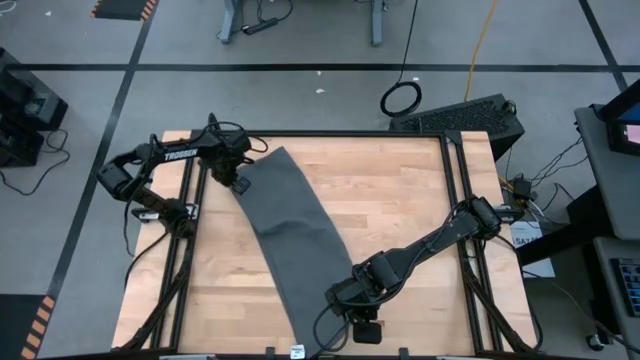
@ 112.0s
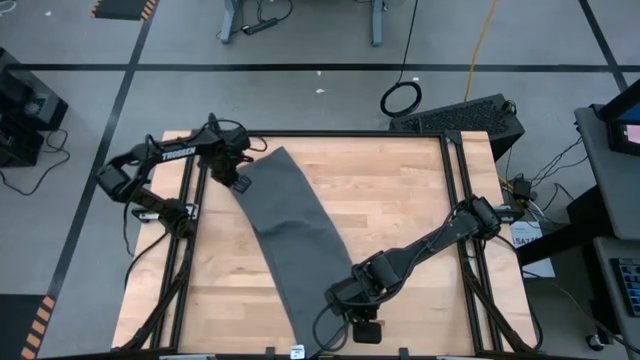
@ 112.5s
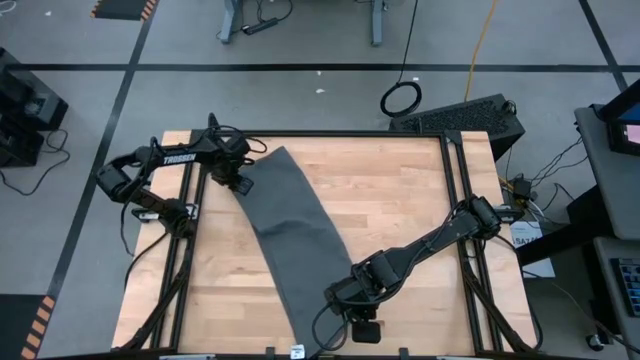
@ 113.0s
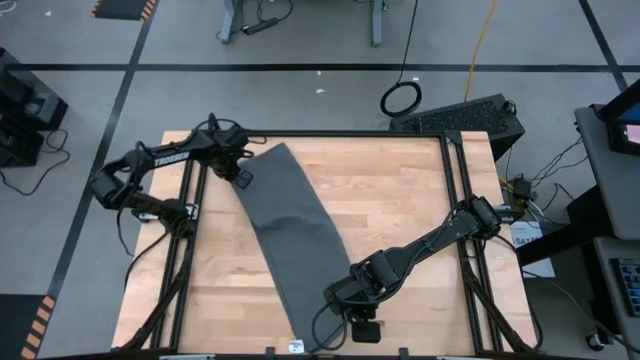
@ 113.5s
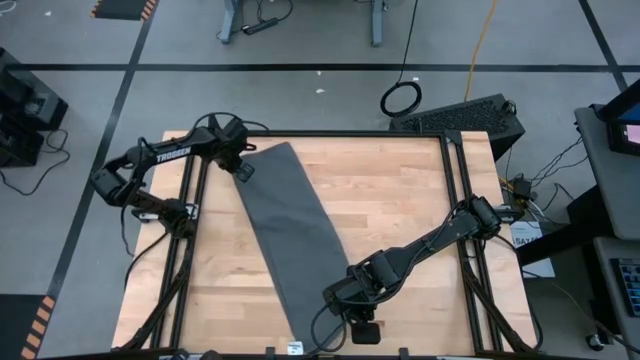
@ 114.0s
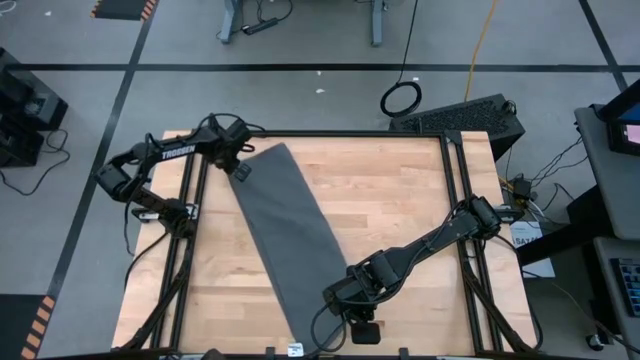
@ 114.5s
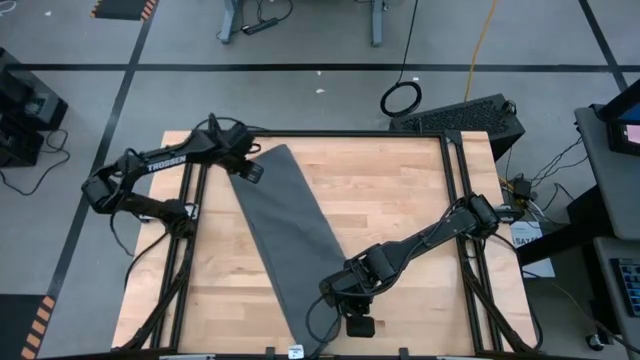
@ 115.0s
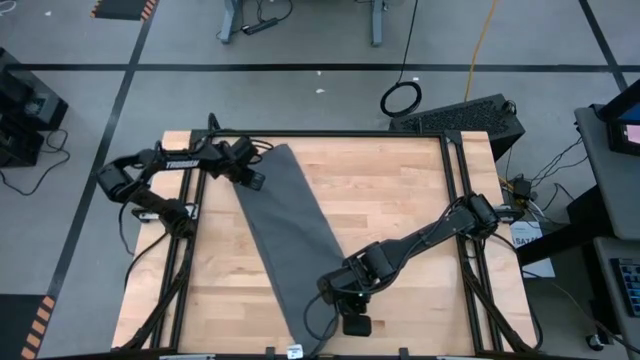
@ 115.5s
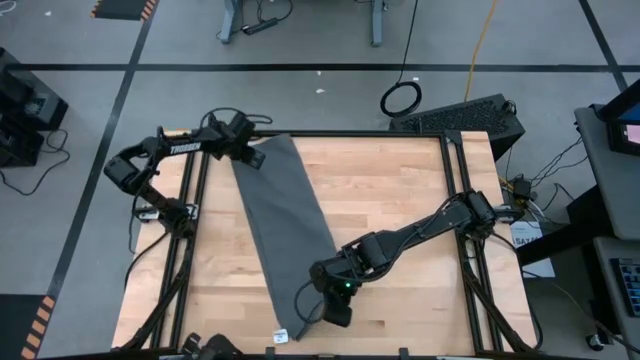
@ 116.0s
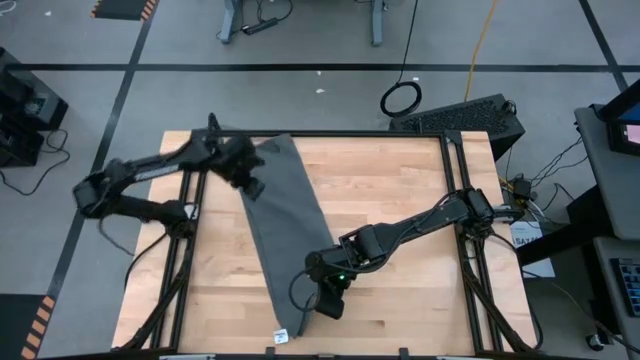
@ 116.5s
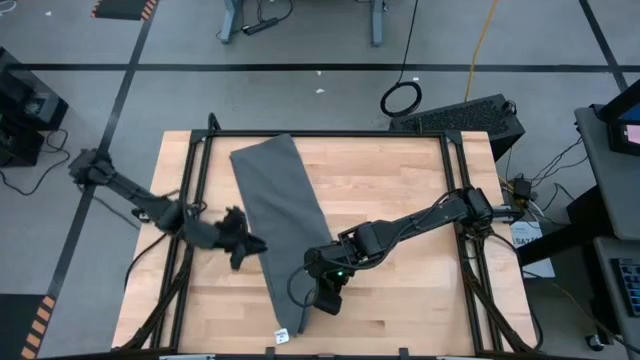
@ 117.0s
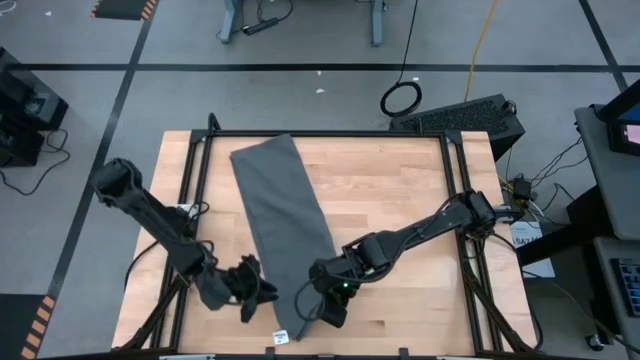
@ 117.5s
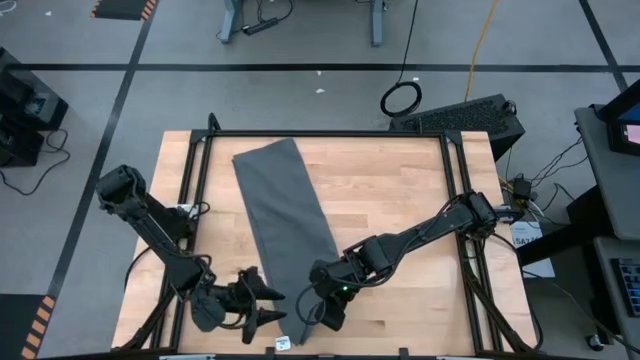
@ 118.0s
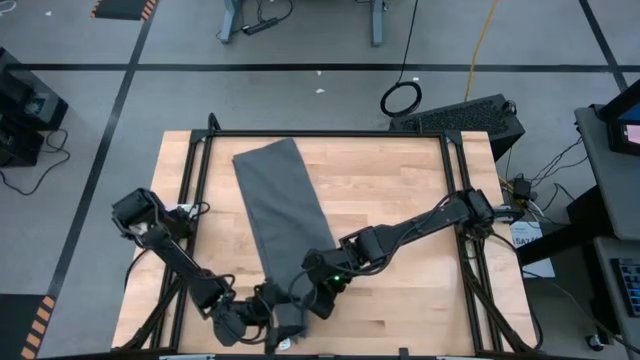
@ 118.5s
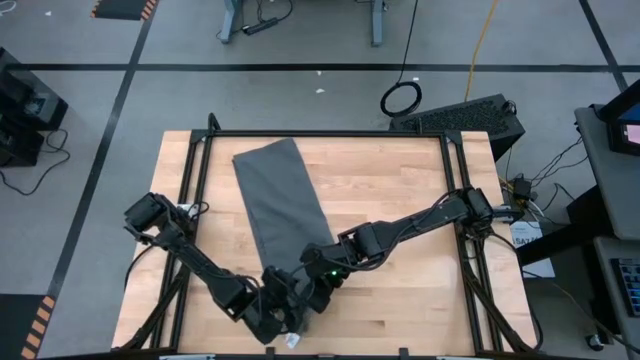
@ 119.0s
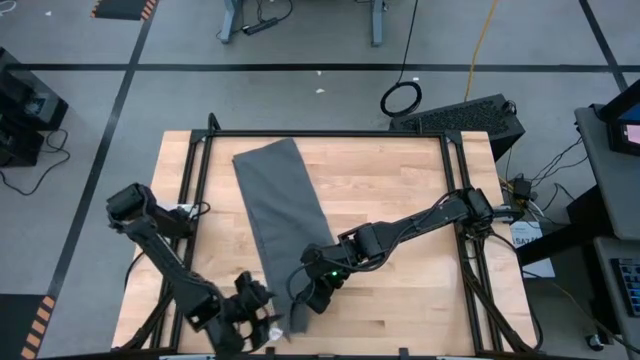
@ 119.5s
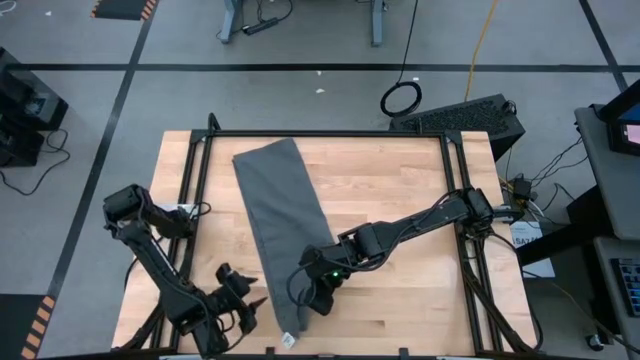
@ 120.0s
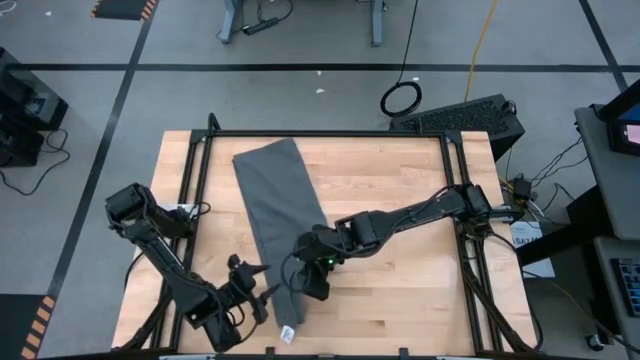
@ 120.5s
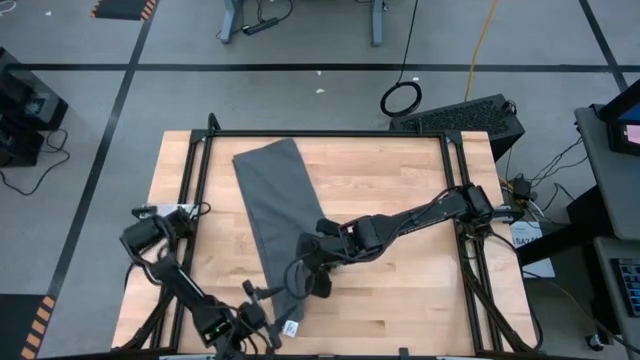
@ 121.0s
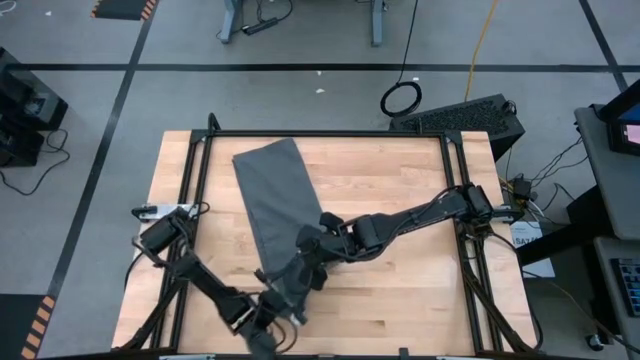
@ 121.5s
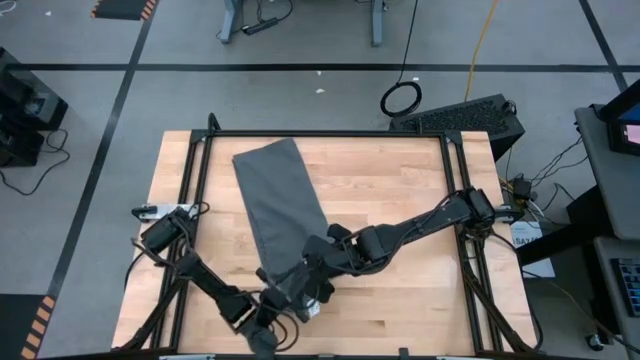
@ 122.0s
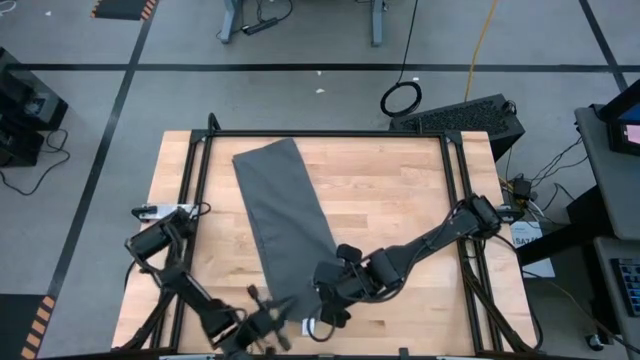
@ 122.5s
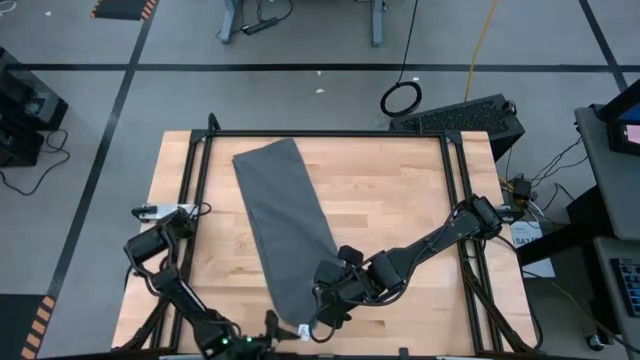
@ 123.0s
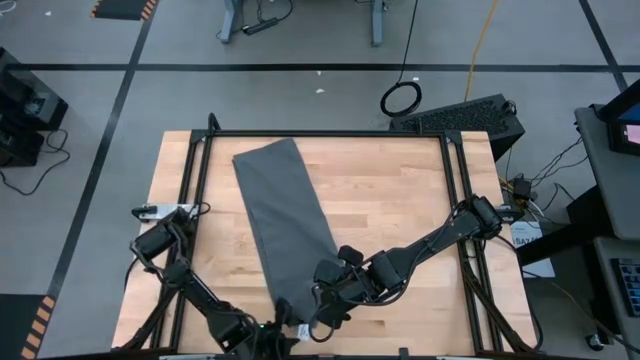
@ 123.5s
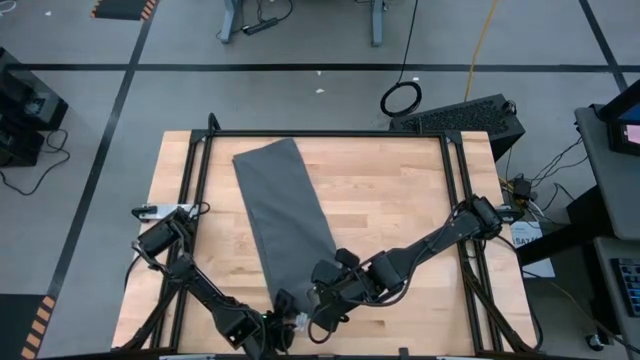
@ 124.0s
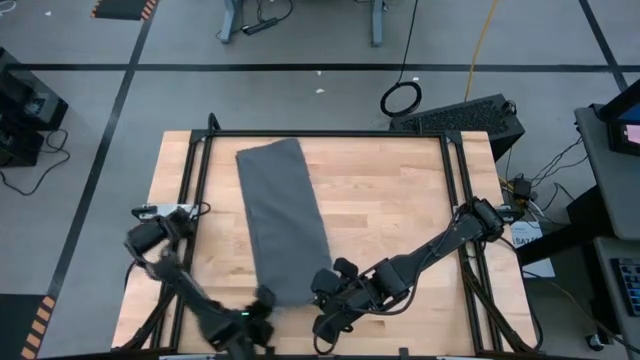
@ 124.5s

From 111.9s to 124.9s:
Task: Roll towel into tight, uniform cylinder
Roll the gray towel

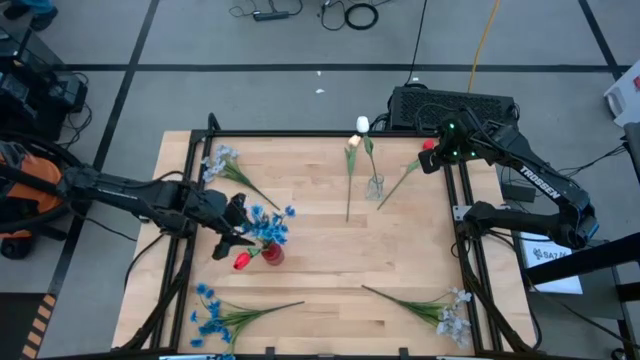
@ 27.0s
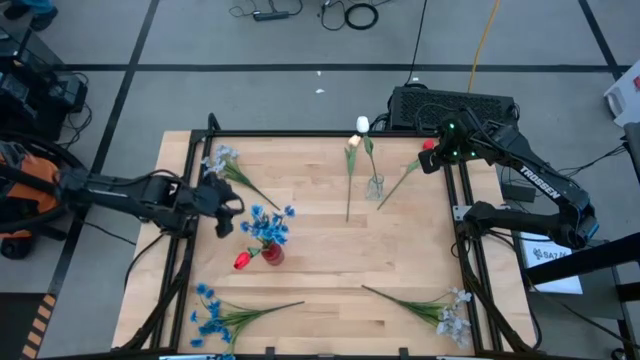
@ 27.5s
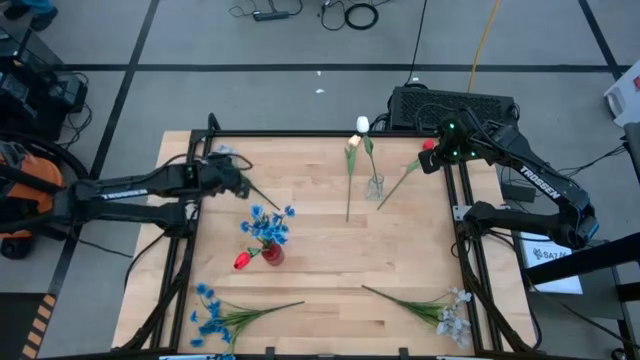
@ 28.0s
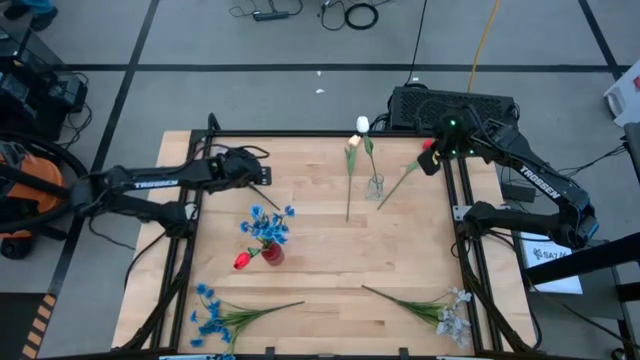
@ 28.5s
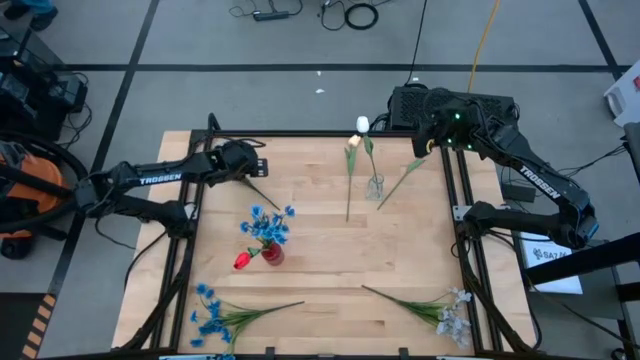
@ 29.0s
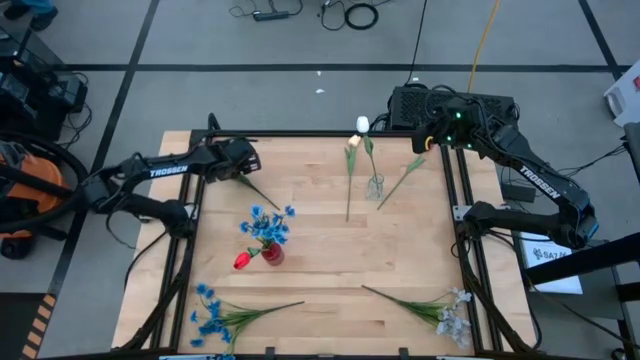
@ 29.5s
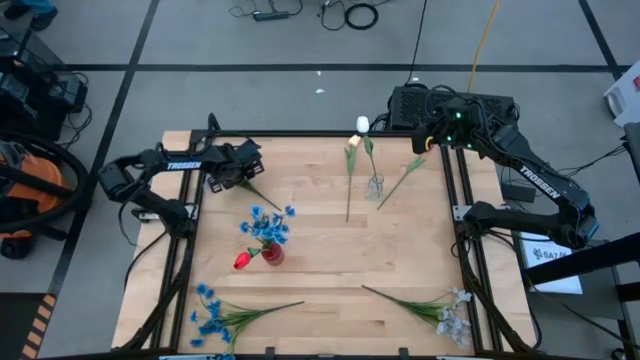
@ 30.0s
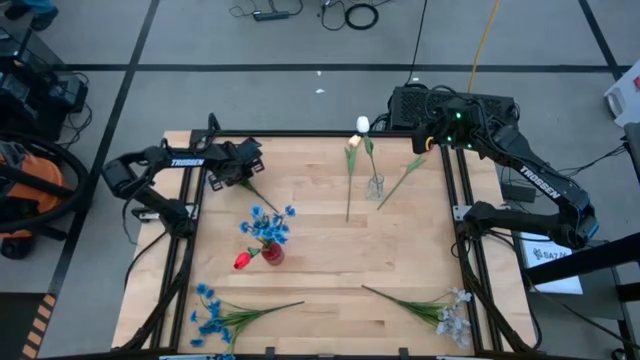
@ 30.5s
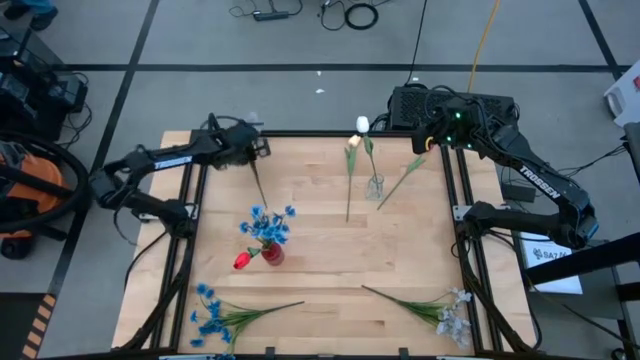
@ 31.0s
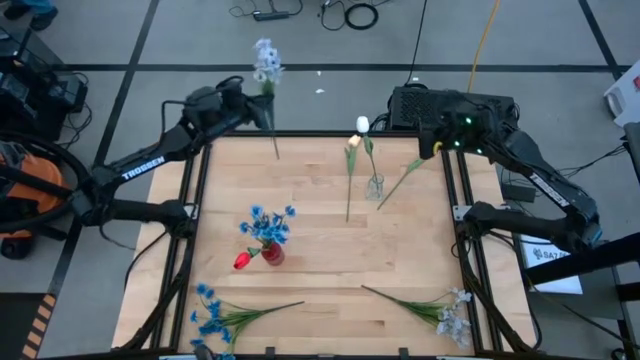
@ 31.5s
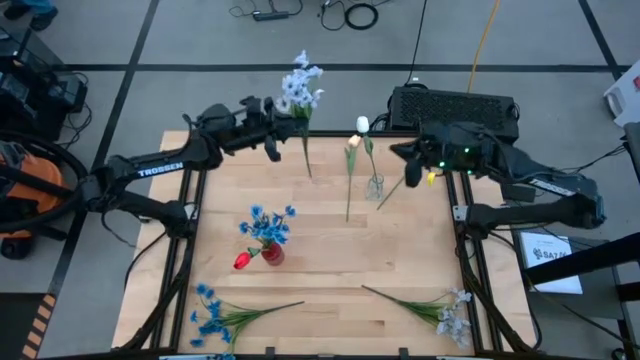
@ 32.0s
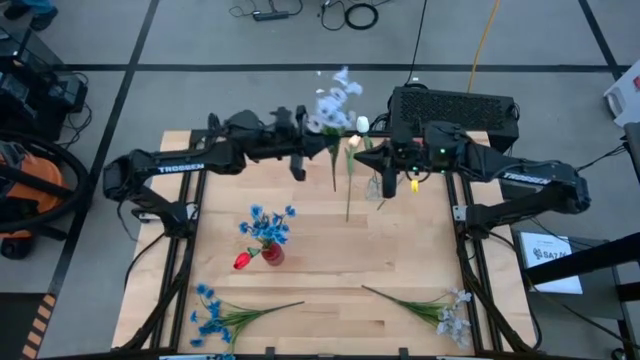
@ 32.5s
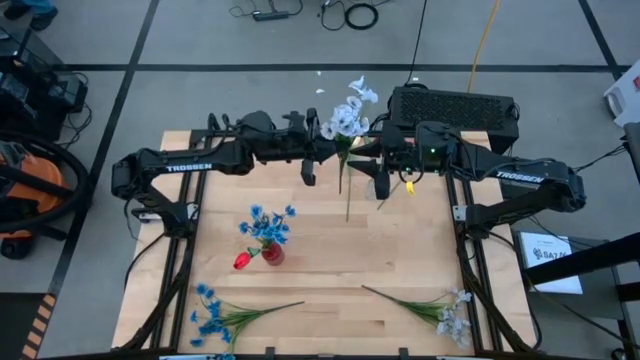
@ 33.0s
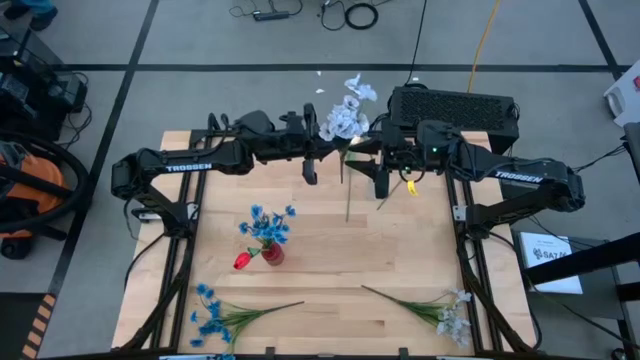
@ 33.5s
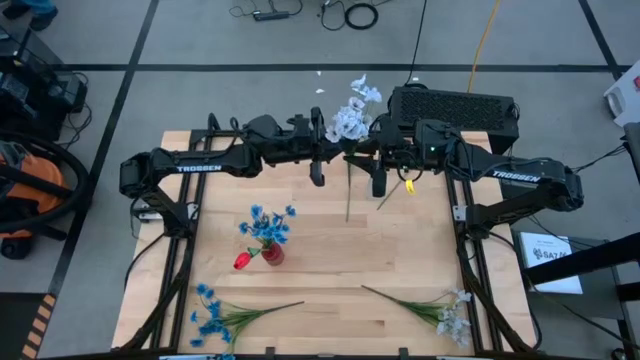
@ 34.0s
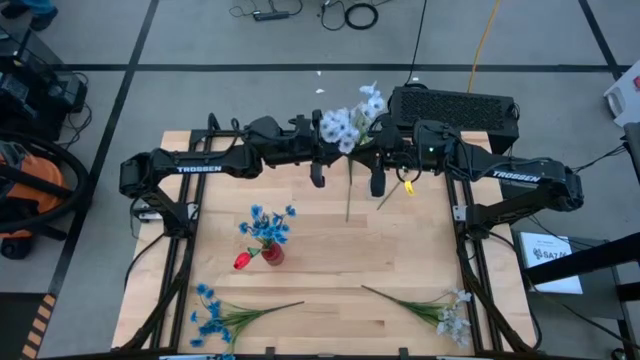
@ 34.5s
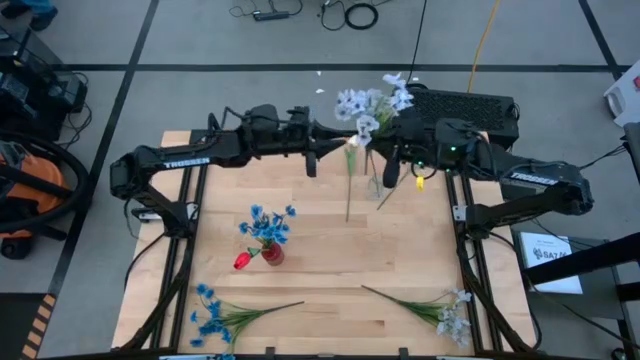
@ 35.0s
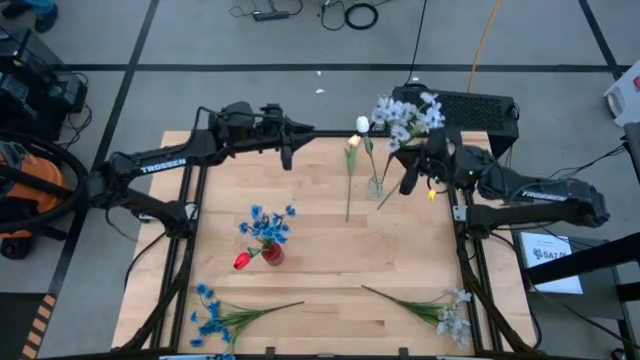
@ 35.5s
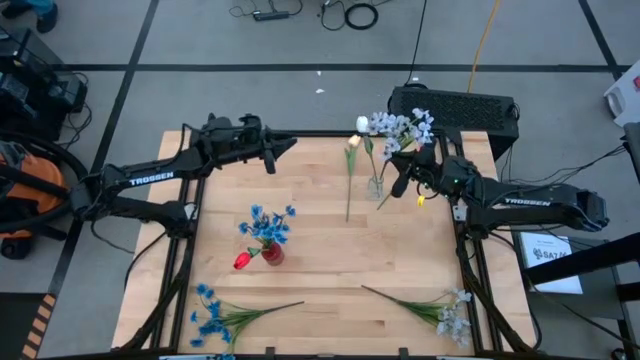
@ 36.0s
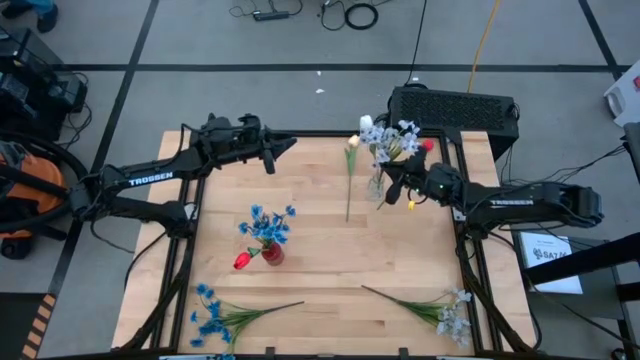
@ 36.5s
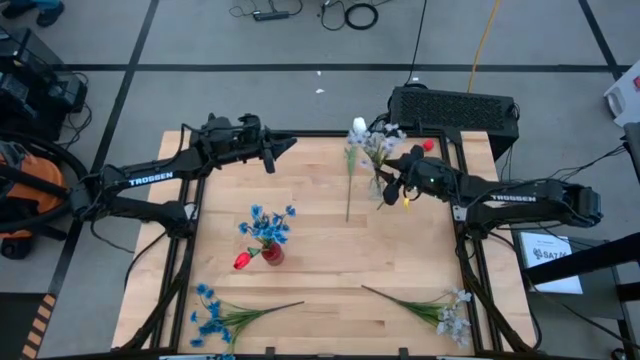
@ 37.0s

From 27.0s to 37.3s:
Task: Sort flowers into vase by color
Put the top white flowers into the transparent vase
